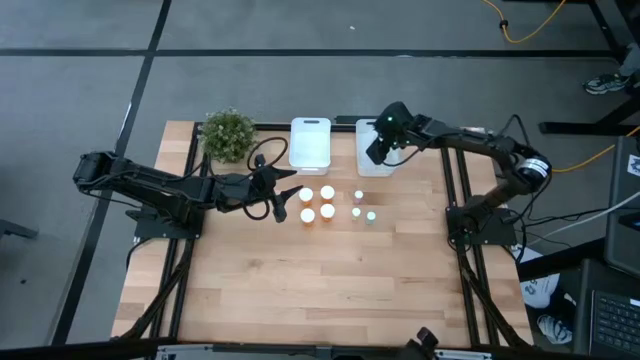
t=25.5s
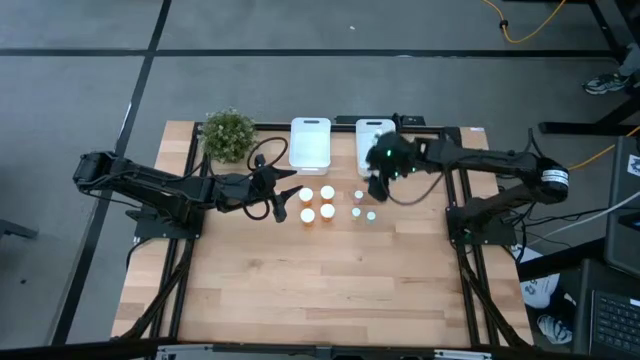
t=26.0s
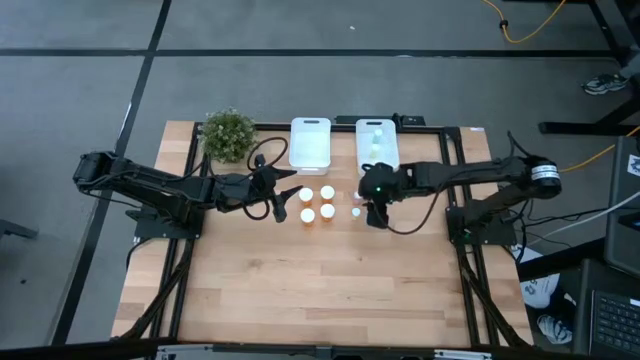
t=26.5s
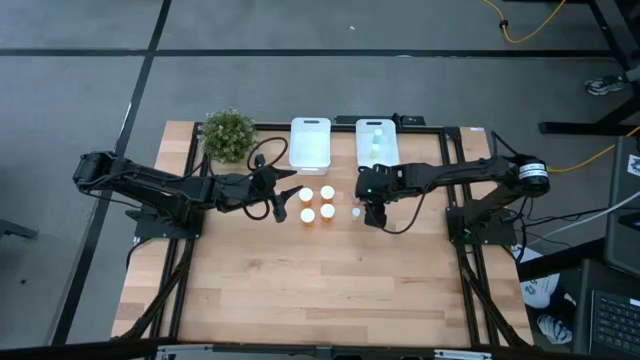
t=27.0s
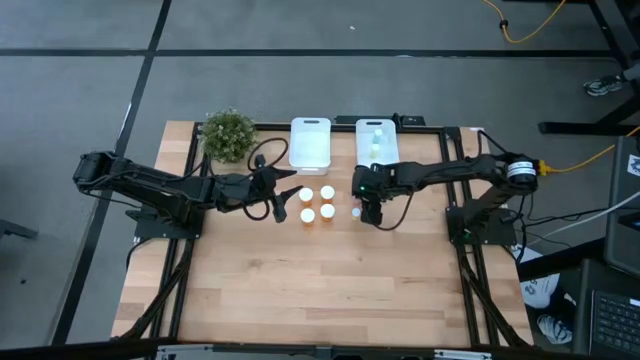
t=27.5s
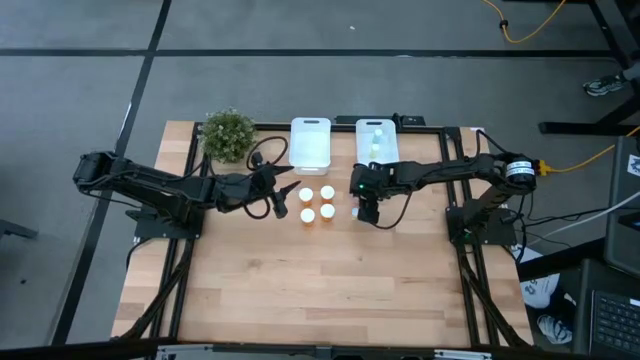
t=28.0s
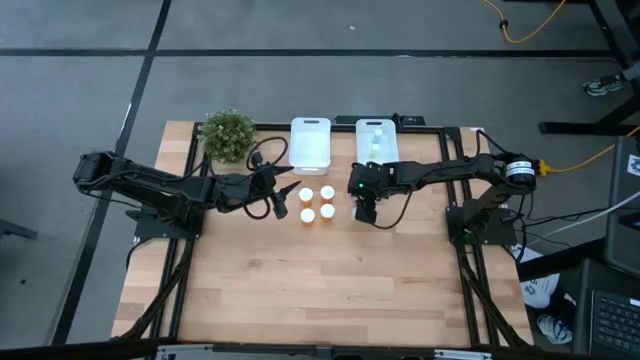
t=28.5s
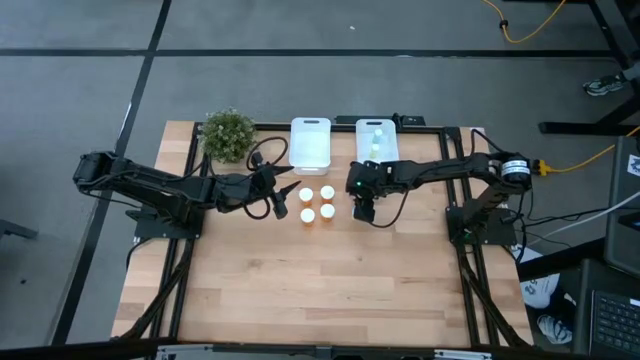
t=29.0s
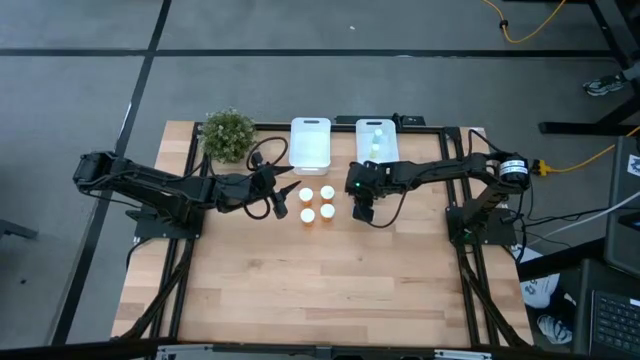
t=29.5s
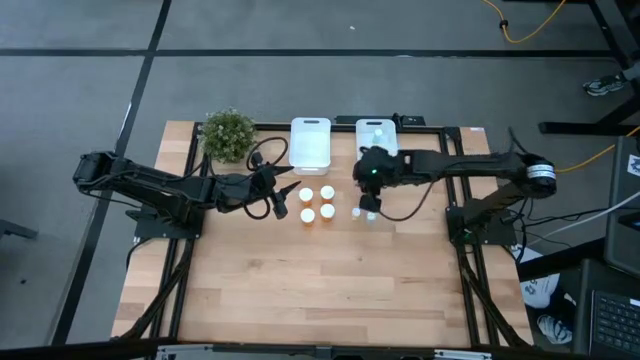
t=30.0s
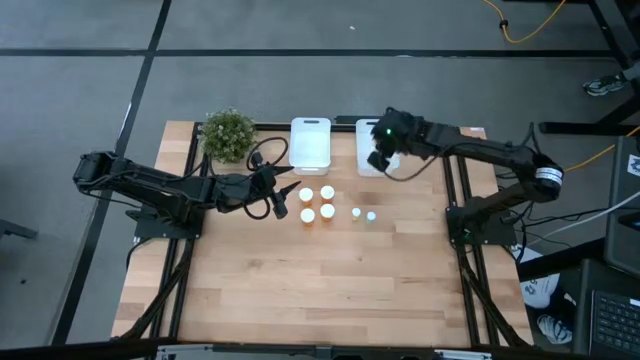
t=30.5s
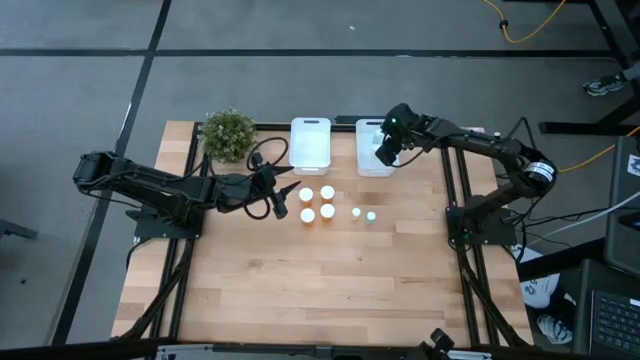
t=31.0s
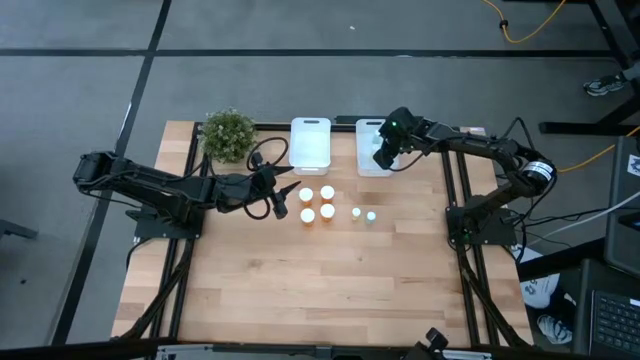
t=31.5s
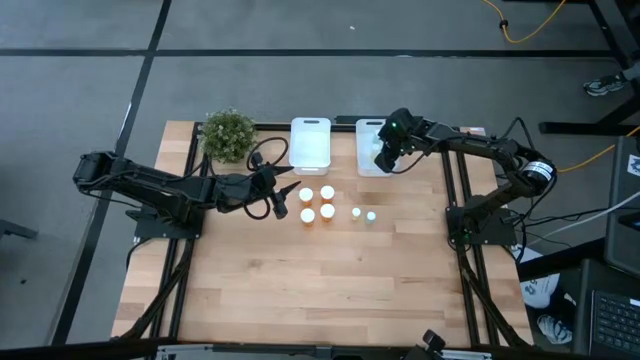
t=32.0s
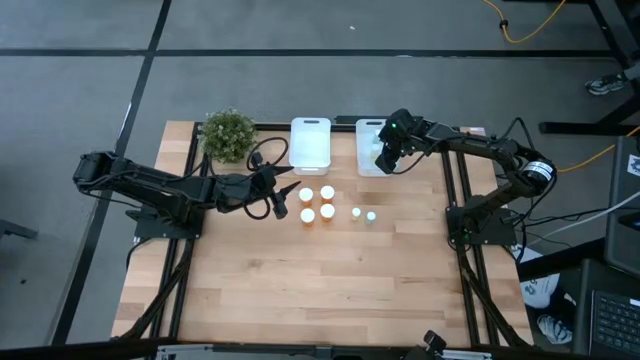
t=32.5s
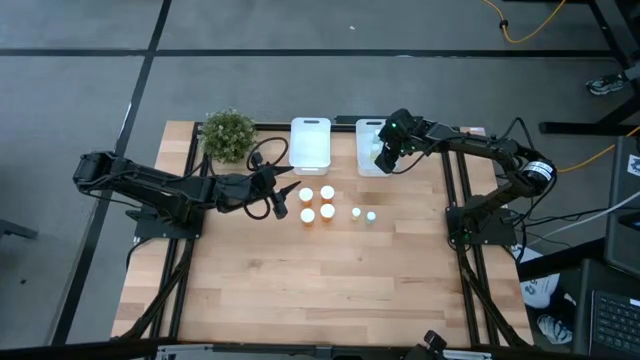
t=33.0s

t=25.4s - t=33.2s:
Task: Pick and place medicine bottles into bin by pill shape (circle, oval)
Put the pink pill bottle into the right white bin

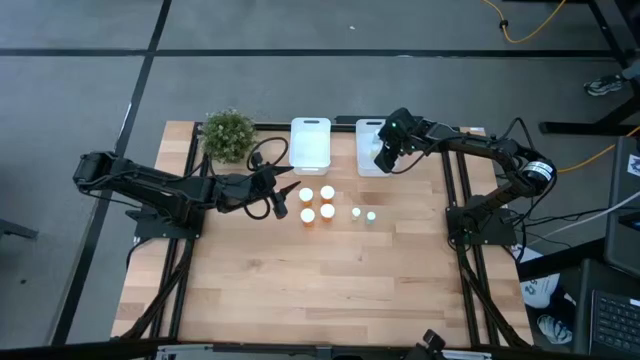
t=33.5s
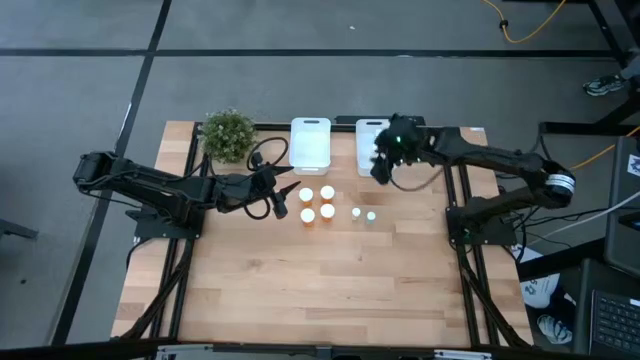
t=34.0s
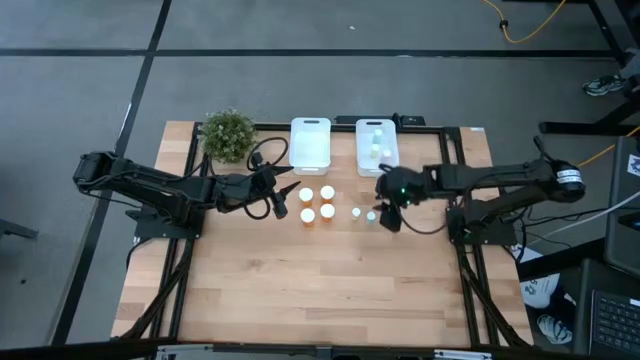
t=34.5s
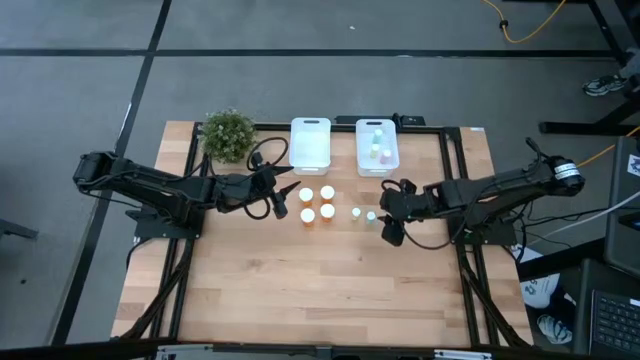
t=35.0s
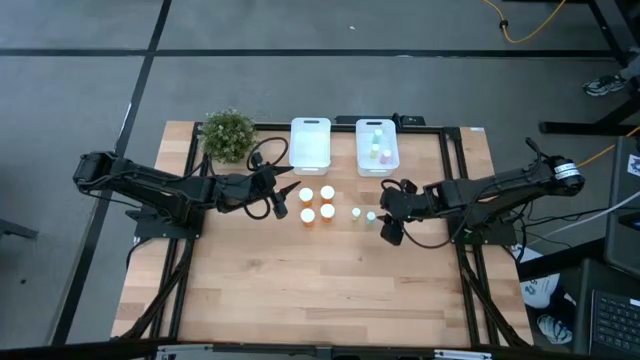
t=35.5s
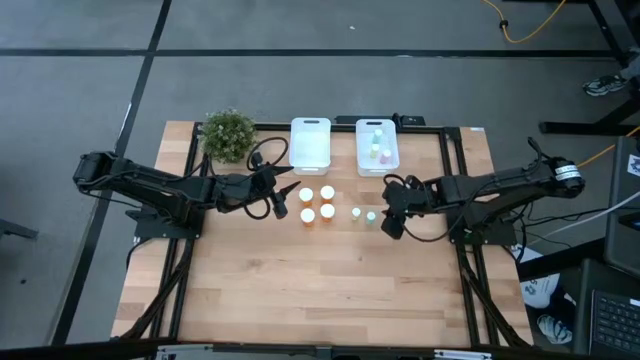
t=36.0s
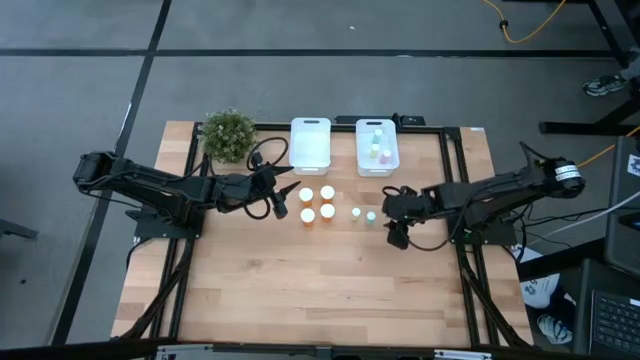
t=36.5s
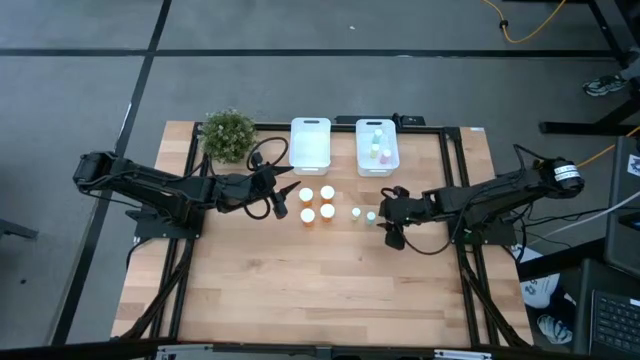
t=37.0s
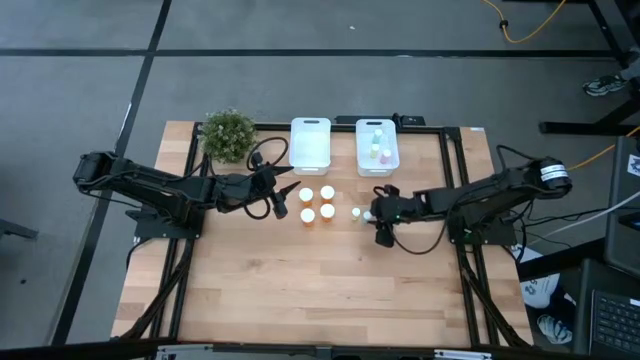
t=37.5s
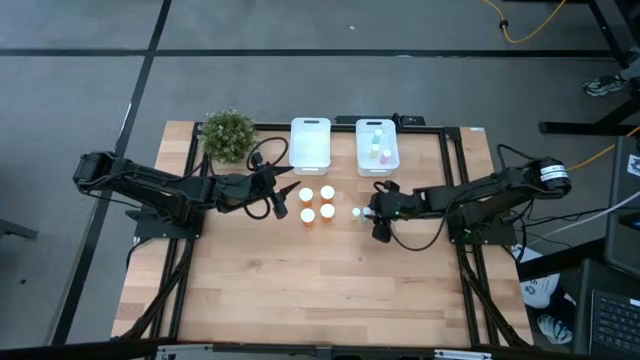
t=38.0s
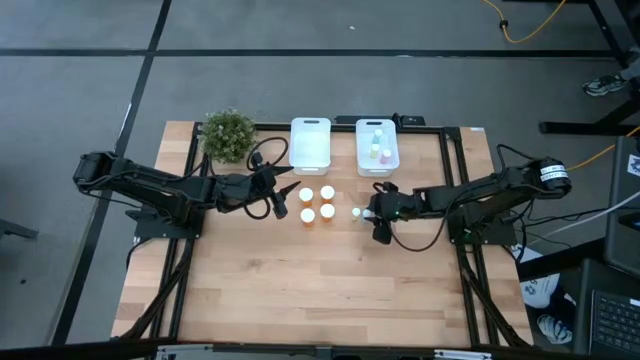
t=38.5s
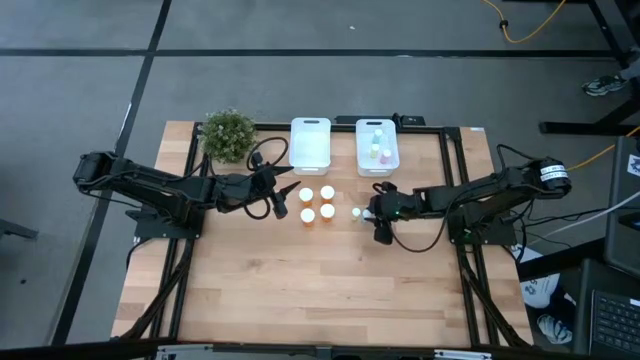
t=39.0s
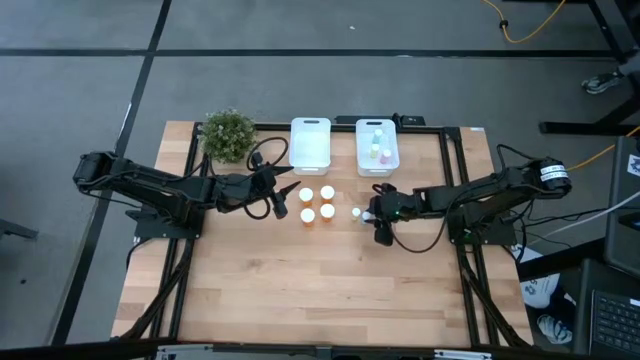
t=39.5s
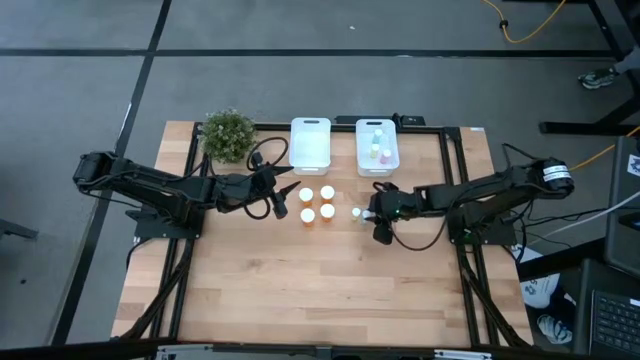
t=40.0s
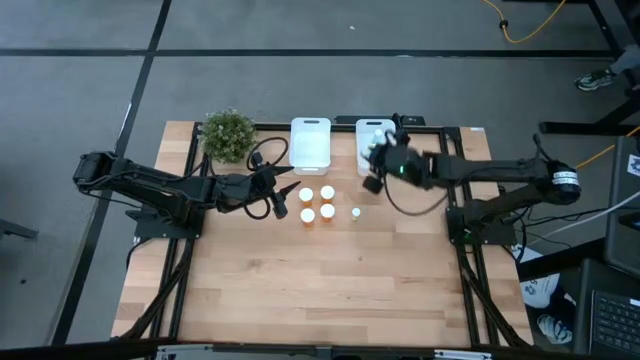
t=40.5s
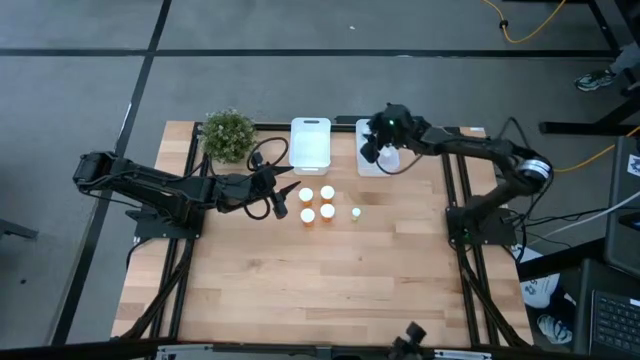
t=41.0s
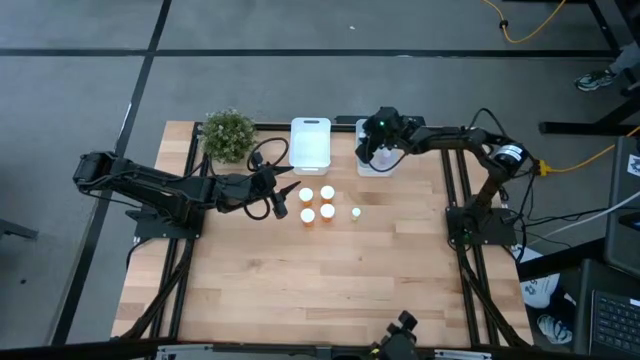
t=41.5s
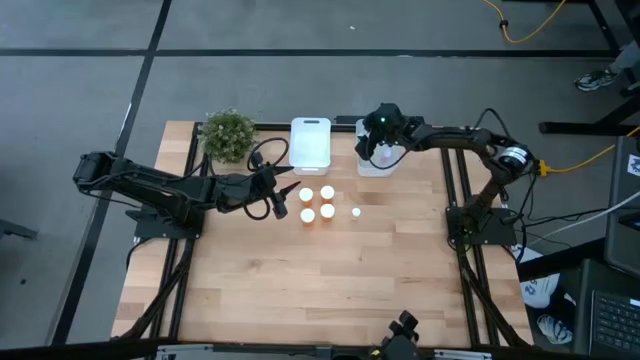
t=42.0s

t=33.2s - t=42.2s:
Put the blue pill bottle into the right white bin

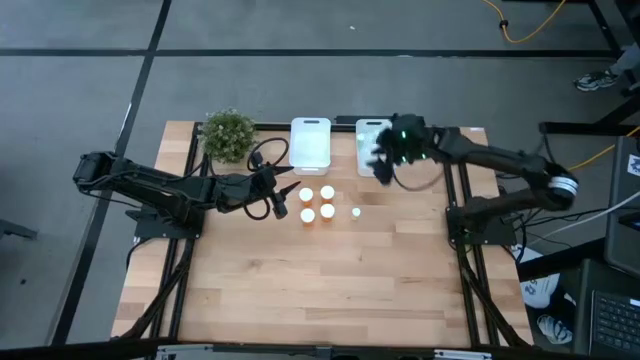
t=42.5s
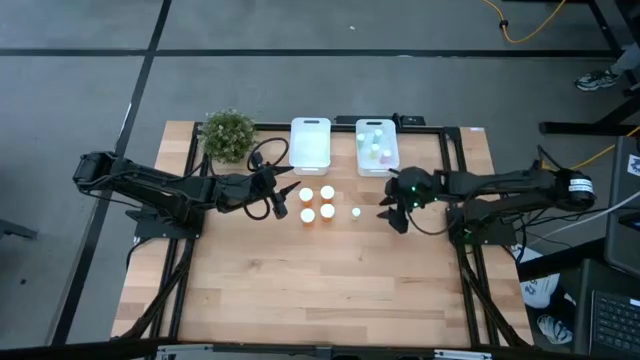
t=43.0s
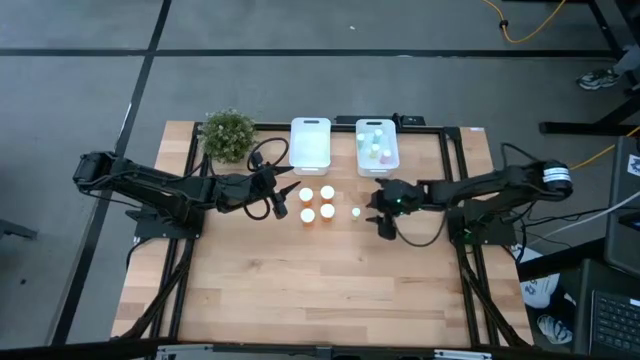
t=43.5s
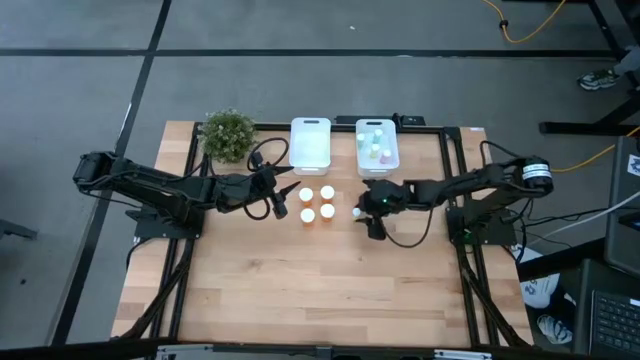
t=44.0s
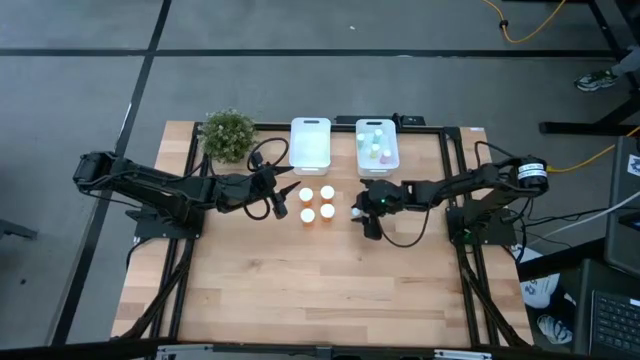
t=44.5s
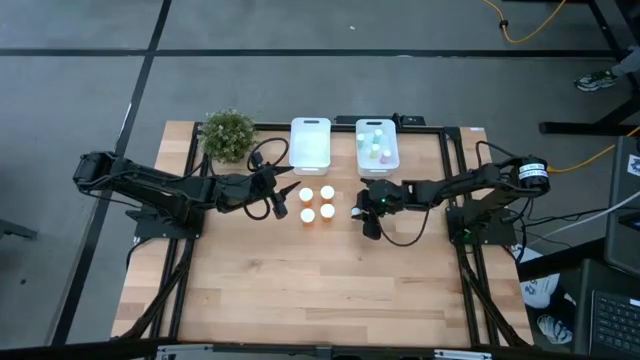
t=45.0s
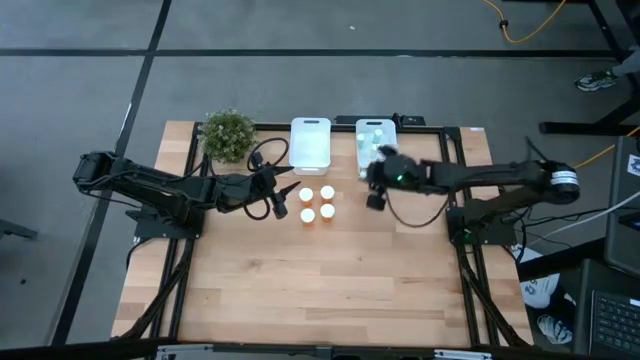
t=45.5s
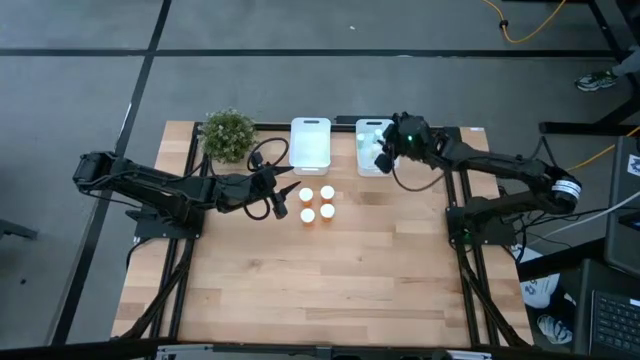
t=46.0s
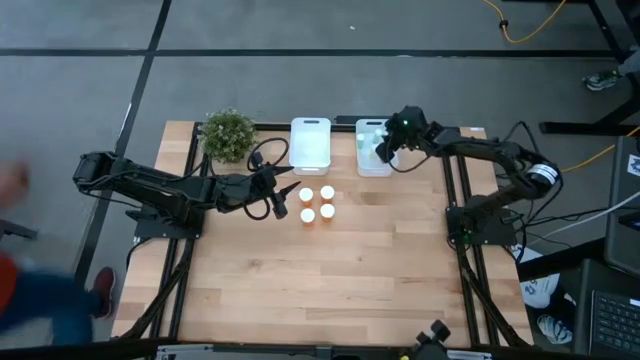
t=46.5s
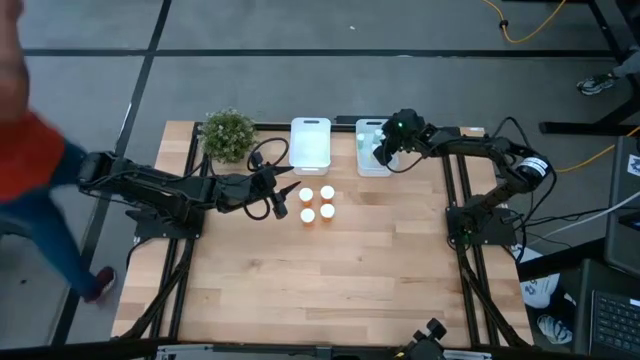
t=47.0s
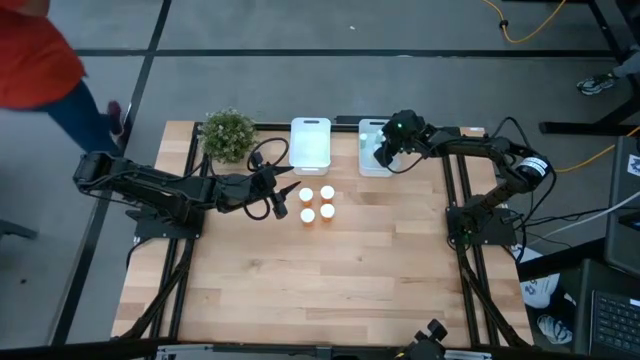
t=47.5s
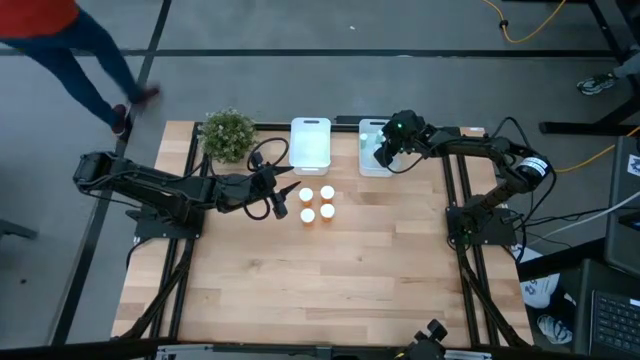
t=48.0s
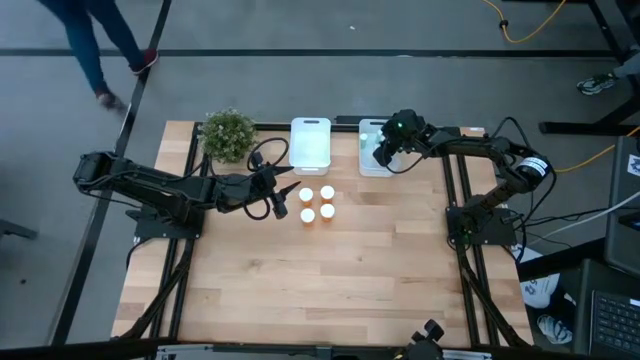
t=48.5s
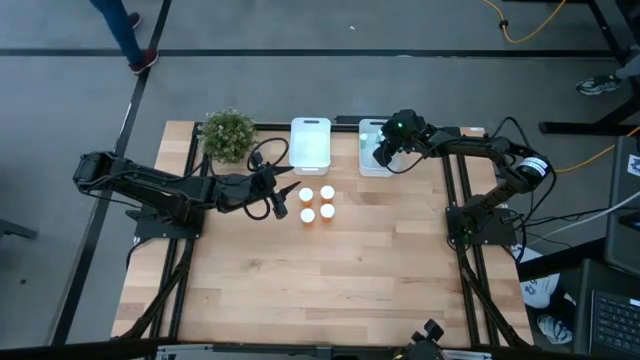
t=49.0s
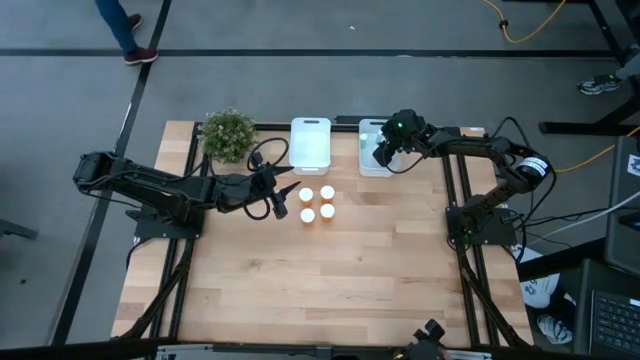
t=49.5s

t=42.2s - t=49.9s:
Put the yellow pill bottle into the right white bin
